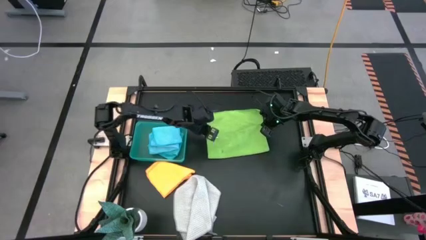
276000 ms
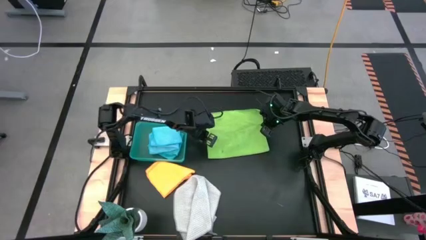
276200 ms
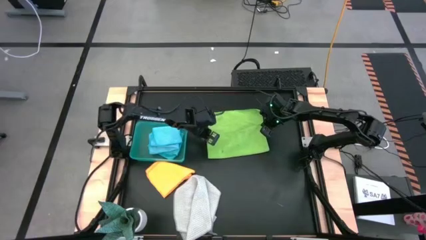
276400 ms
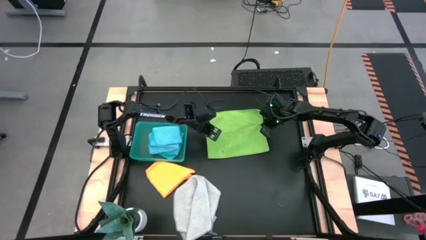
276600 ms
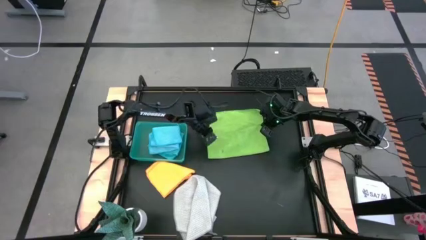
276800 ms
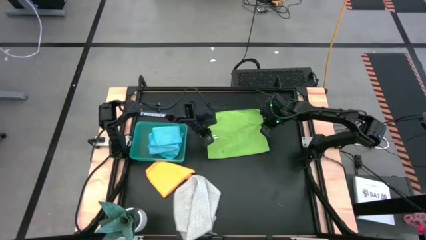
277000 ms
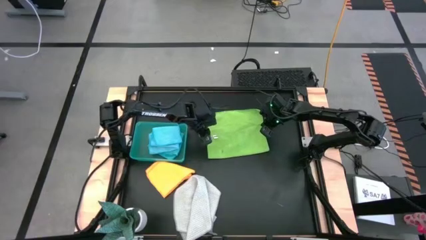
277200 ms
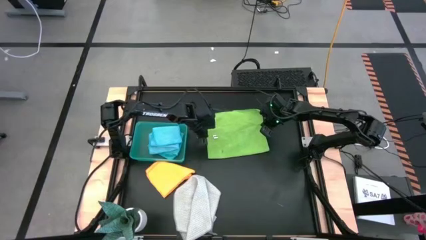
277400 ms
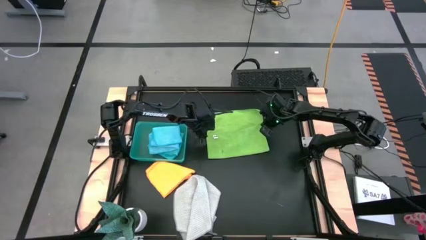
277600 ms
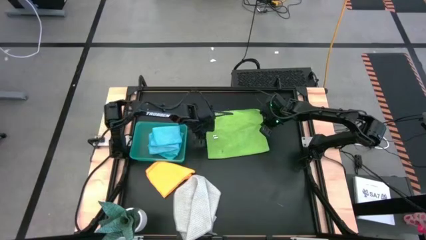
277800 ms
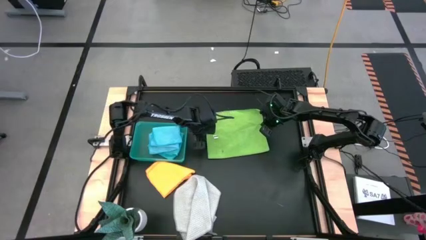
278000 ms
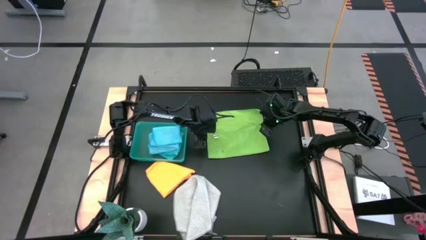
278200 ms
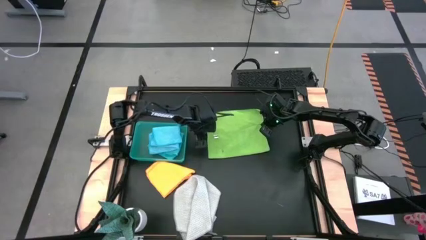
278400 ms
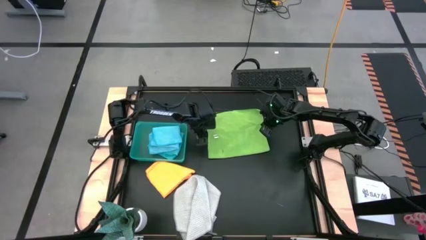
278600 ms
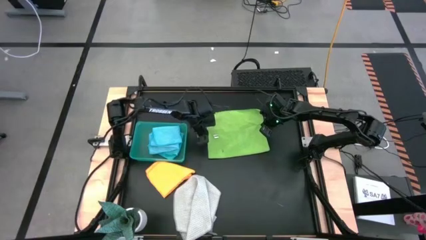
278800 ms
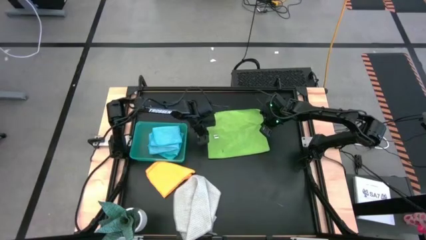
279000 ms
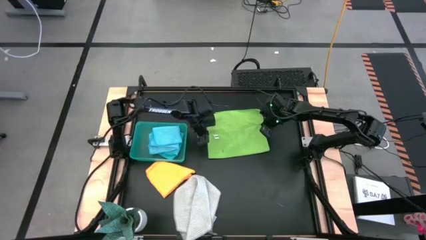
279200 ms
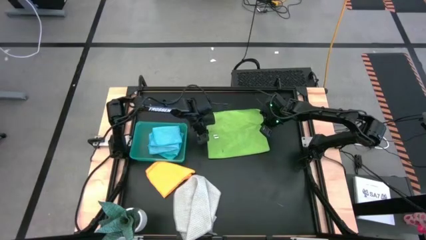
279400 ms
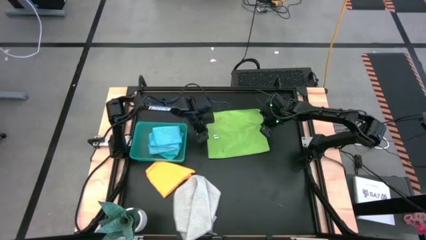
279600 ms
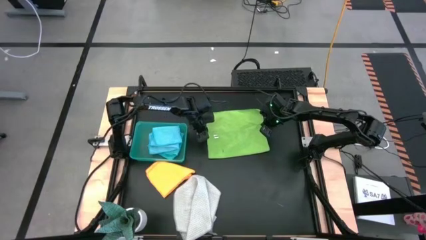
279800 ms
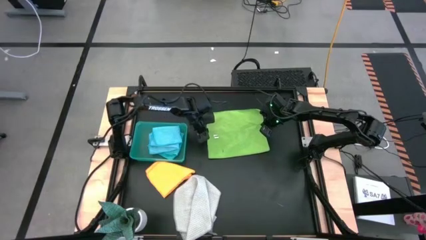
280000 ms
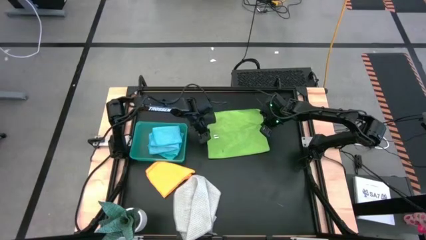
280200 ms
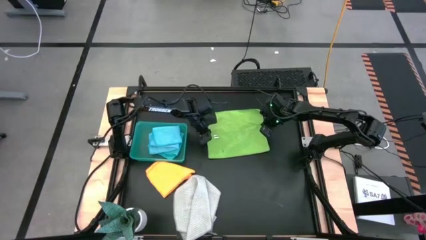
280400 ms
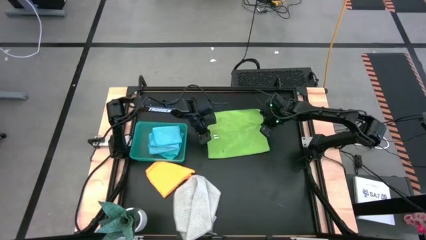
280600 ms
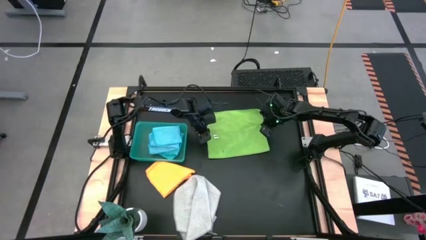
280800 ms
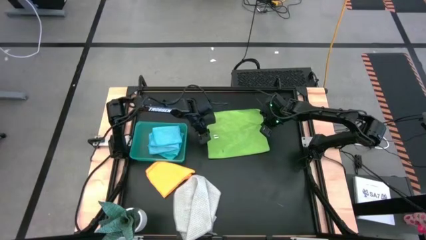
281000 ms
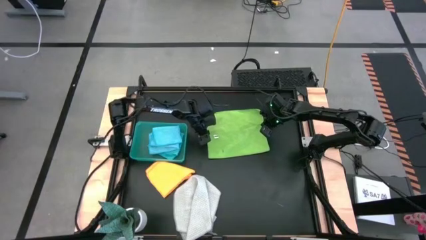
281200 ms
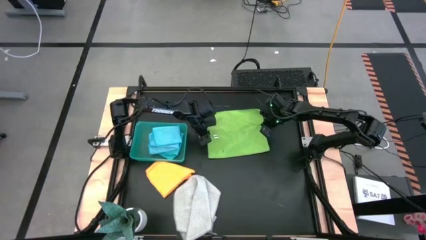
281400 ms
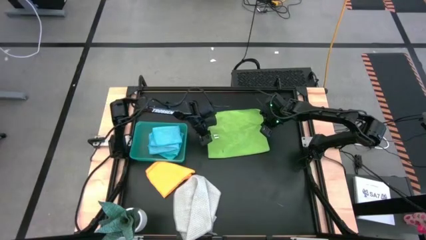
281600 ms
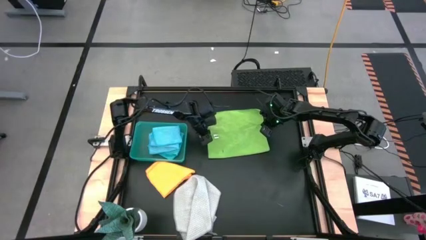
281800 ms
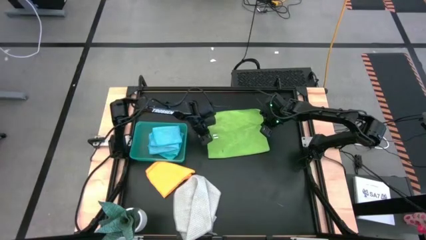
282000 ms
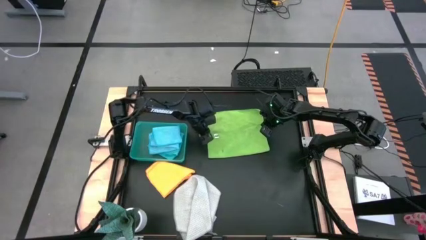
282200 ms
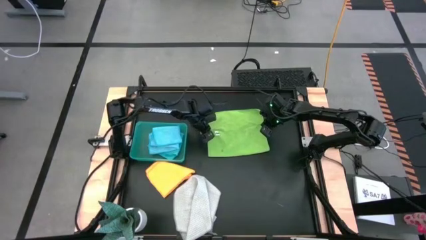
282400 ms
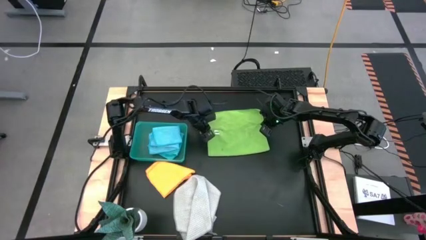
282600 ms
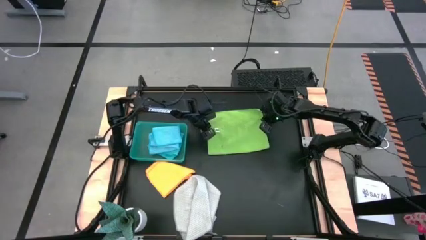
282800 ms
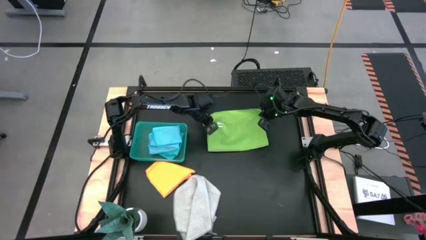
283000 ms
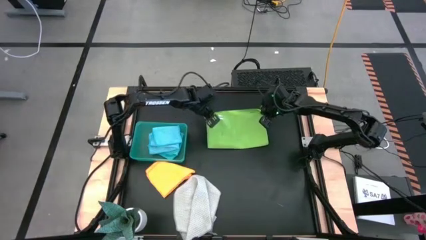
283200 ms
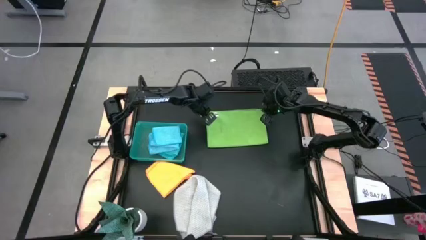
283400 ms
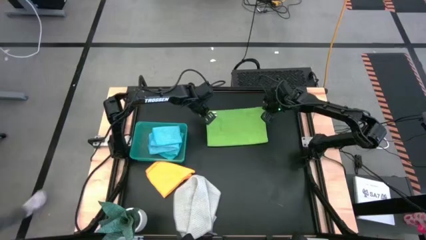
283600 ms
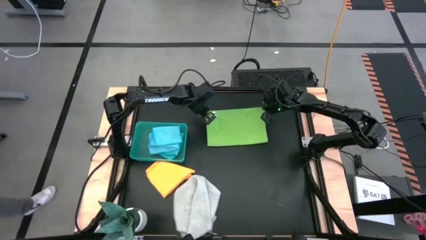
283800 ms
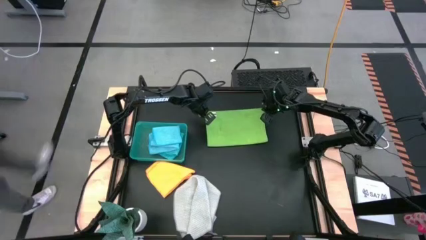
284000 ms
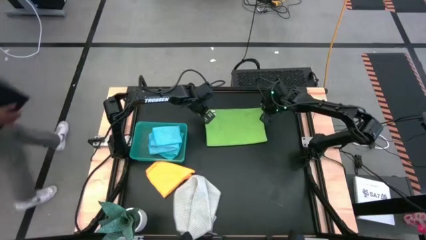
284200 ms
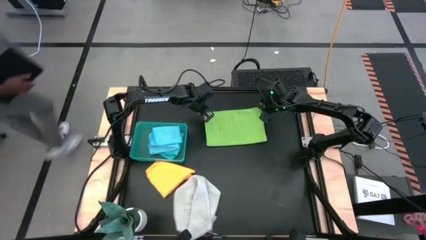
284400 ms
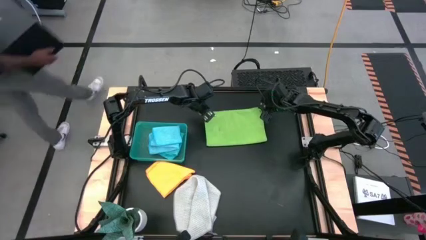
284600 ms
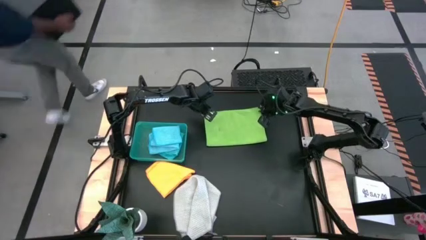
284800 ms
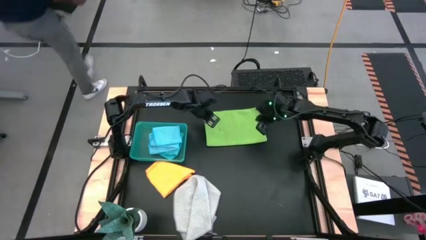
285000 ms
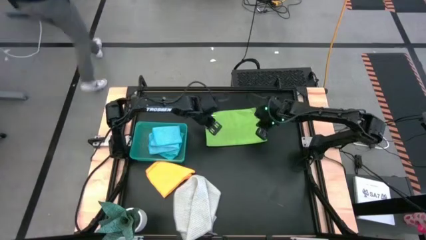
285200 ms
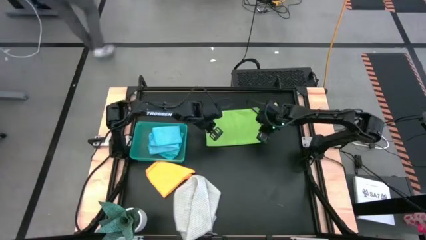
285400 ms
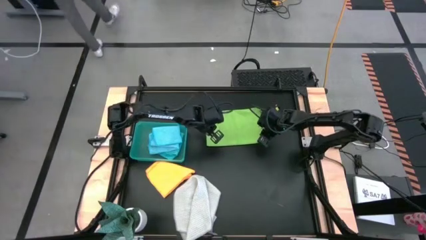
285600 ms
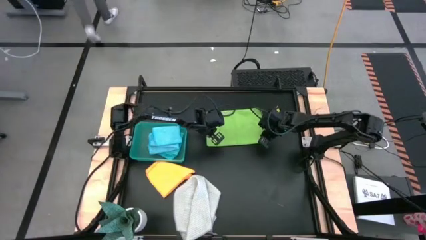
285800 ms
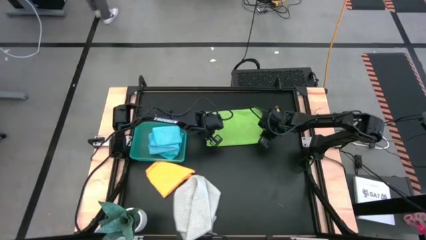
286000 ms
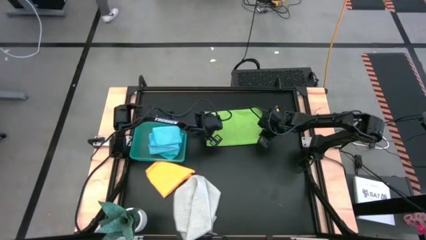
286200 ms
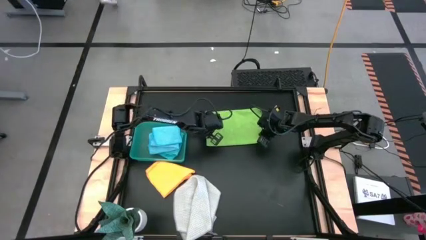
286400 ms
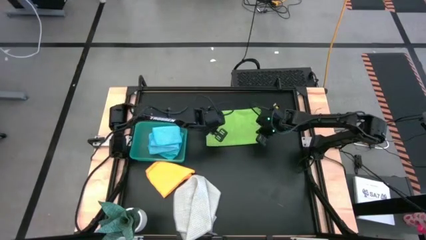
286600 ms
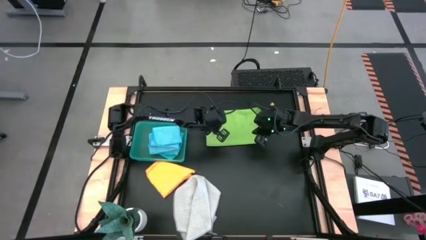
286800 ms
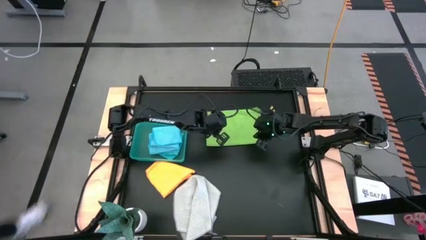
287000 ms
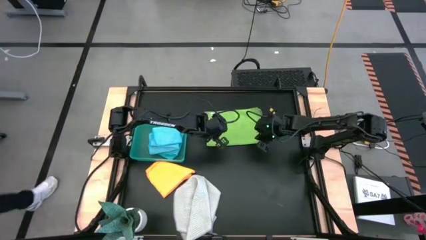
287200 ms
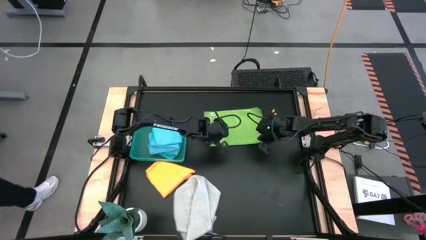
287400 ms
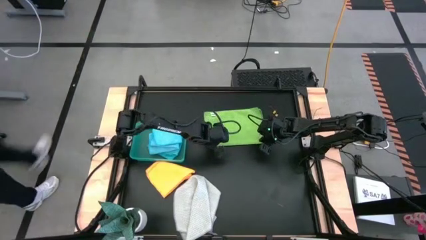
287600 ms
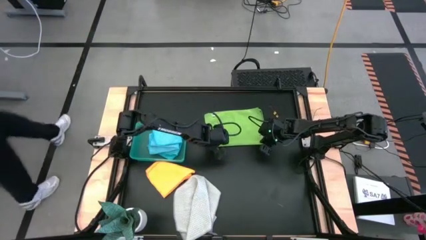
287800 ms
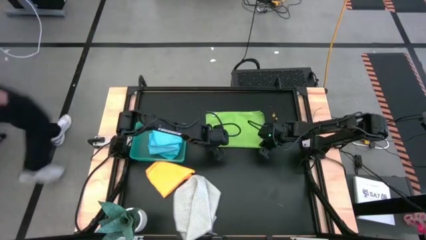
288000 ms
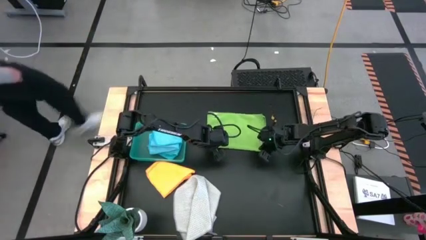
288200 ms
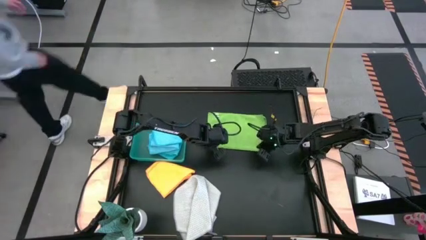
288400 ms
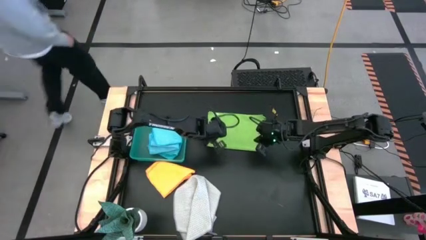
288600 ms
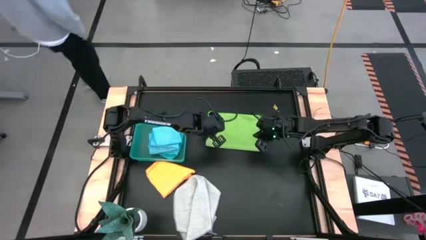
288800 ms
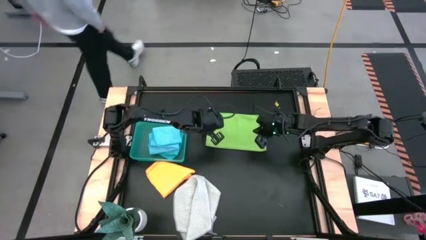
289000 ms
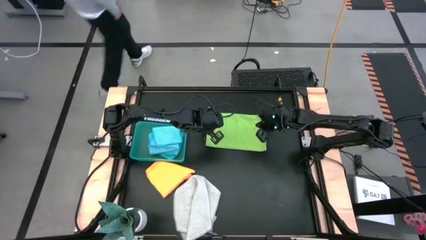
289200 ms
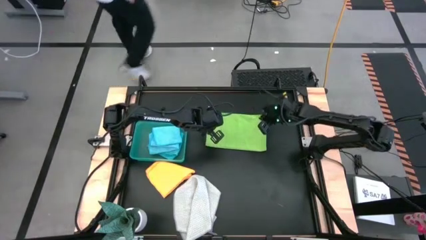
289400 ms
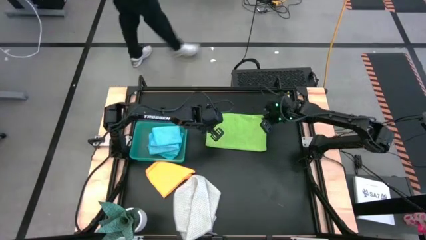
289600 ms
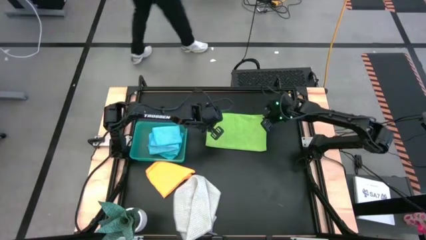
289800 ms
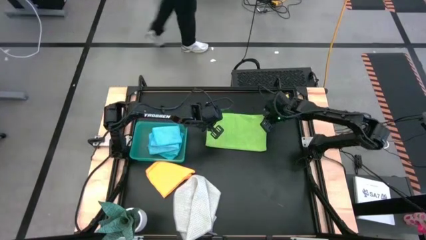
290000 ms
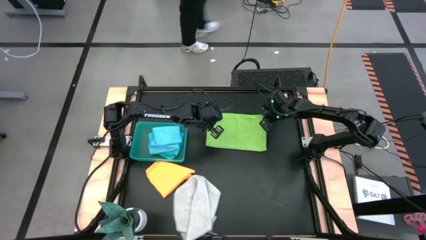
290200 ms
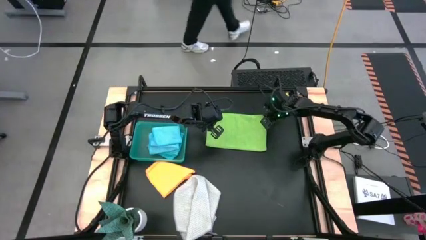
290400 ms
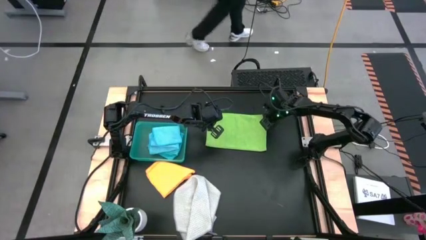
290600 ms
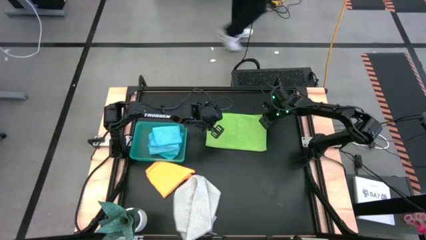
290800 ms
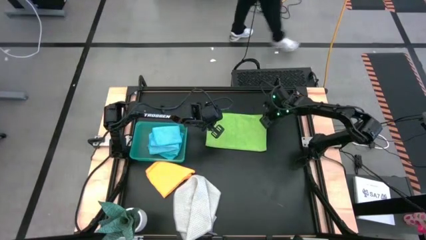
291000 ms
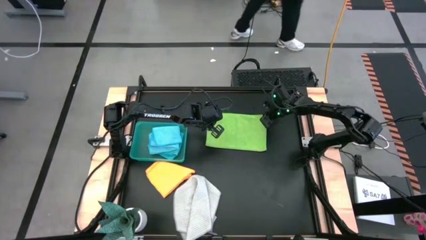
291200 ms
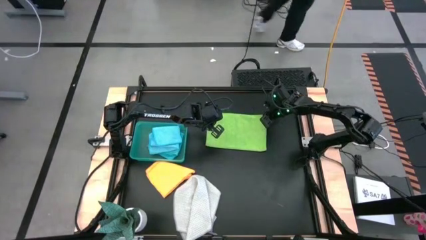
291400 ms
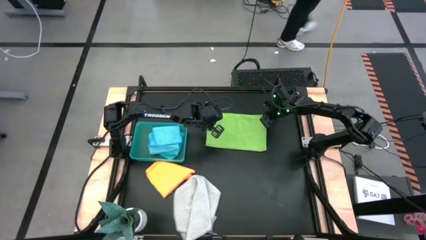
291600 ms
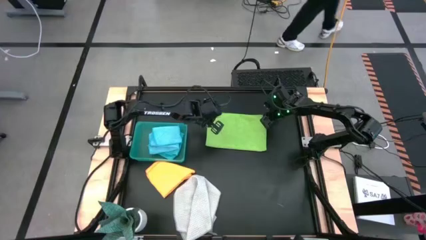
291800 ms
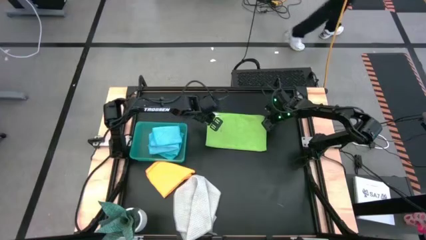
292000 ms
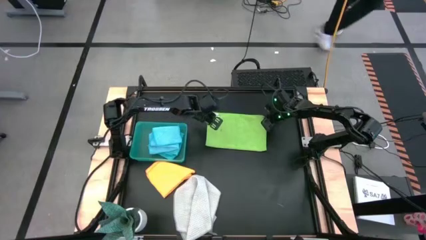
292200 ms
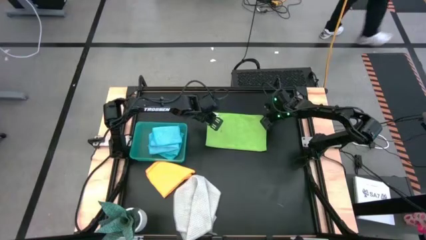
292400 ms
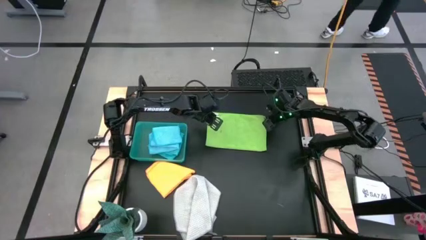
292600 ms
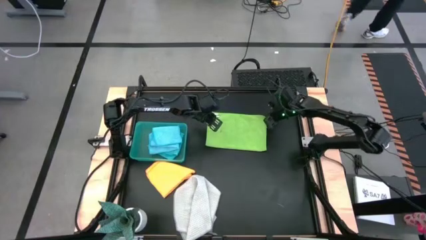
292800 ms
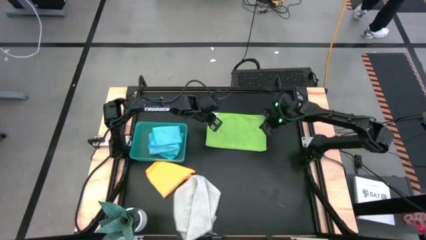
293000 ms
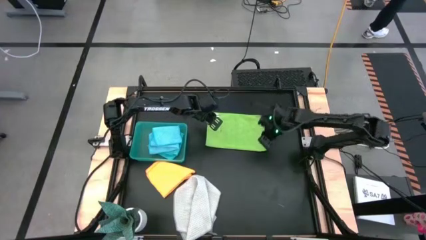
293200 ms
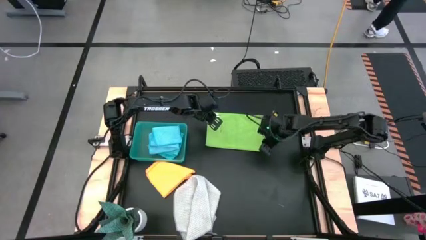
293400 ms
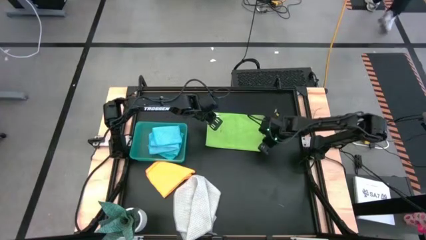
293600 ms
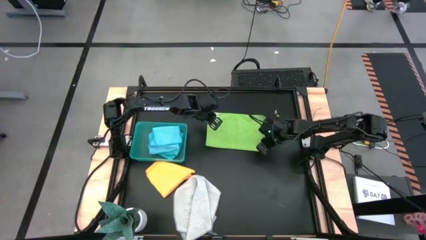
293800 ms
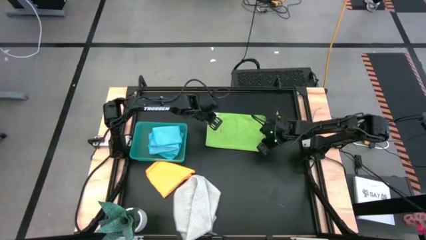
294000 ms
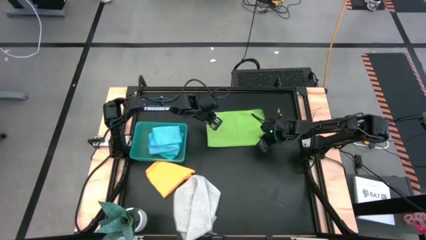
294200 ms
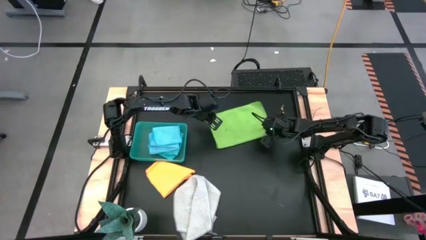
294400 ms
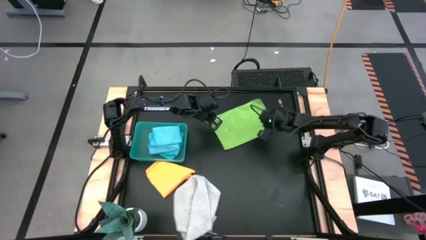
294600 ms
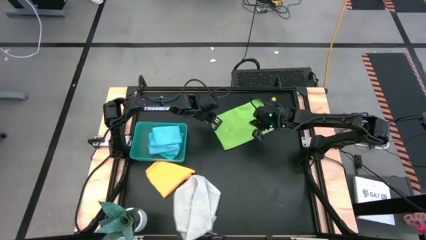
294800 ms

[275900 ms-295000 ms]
Task: Fold microfiber towels
Fold the green microfiber towel
